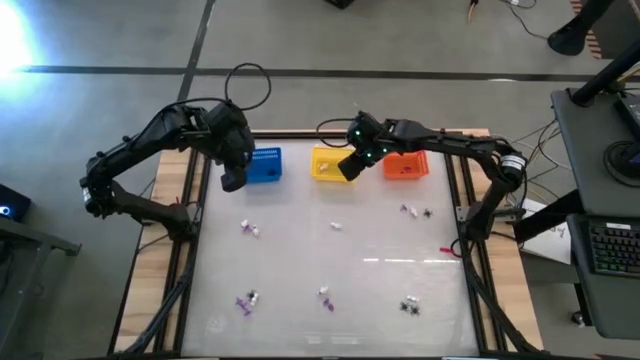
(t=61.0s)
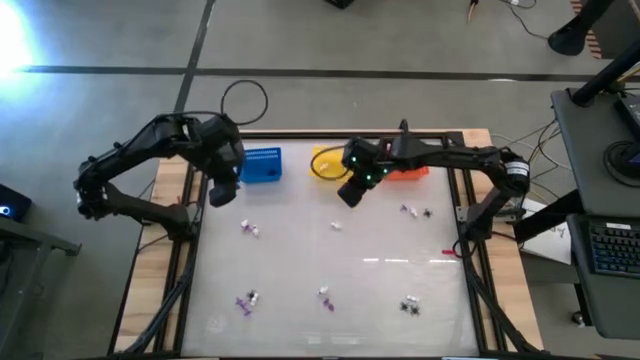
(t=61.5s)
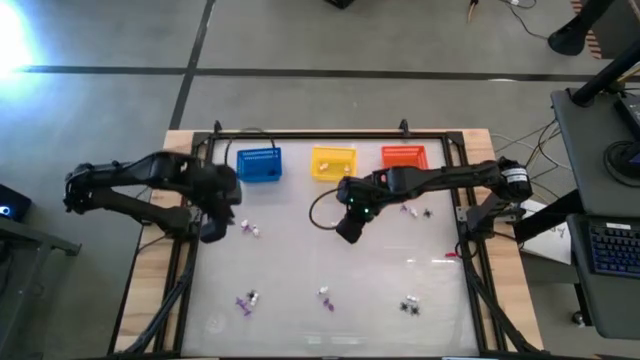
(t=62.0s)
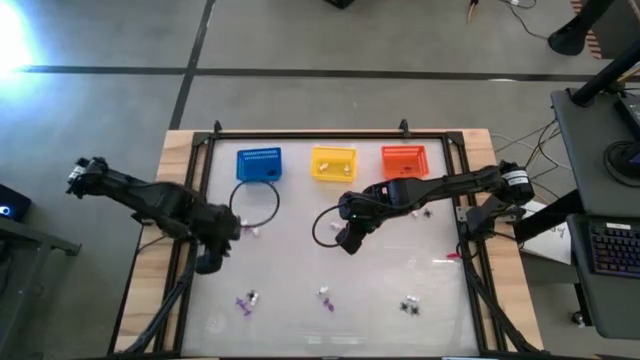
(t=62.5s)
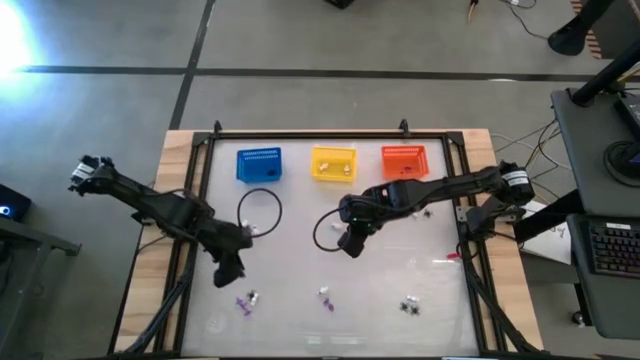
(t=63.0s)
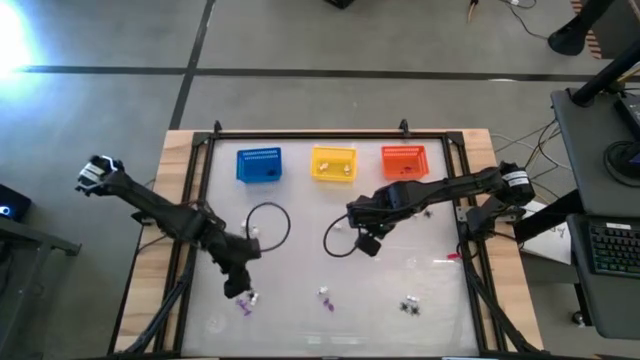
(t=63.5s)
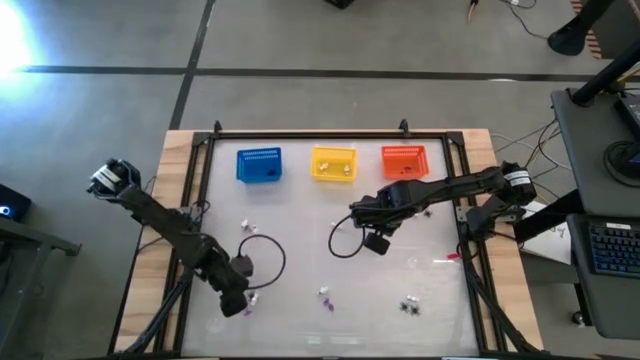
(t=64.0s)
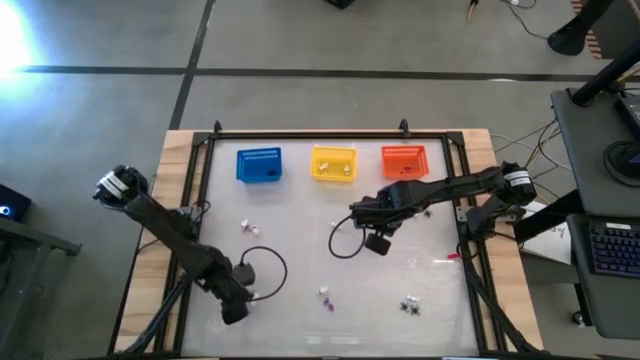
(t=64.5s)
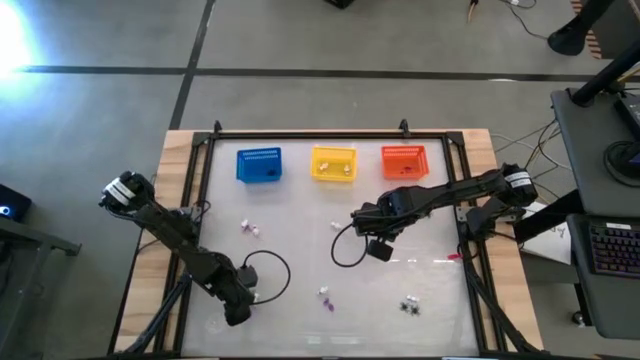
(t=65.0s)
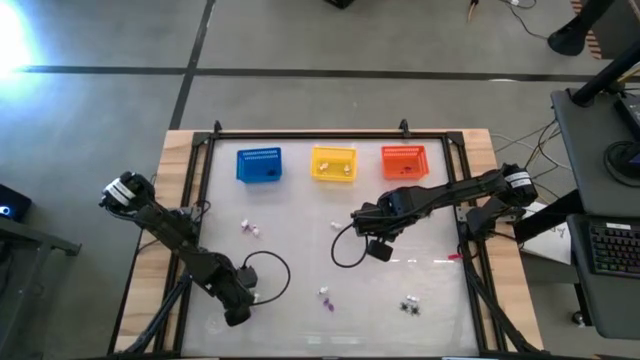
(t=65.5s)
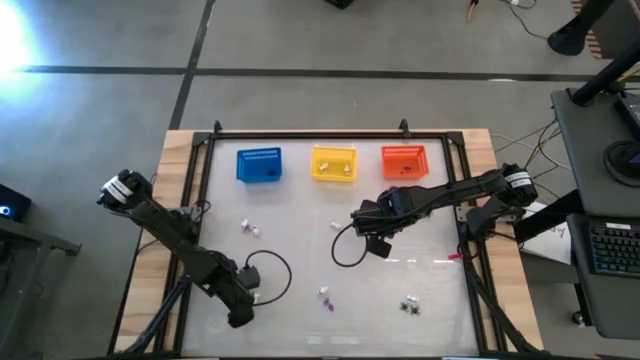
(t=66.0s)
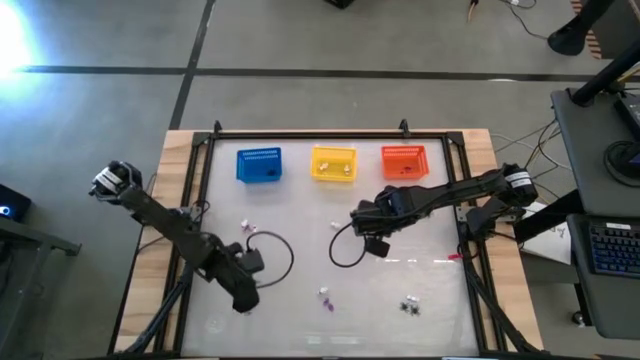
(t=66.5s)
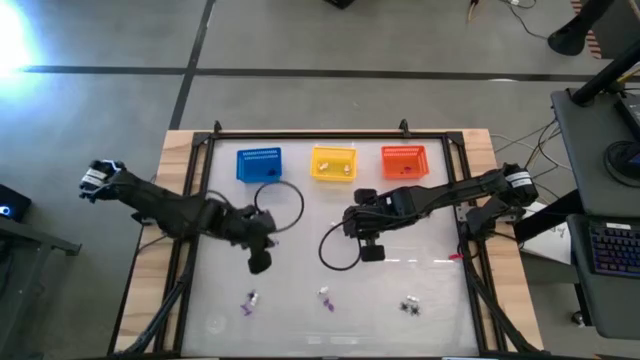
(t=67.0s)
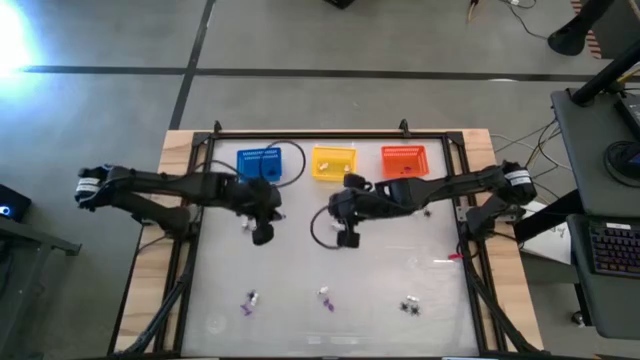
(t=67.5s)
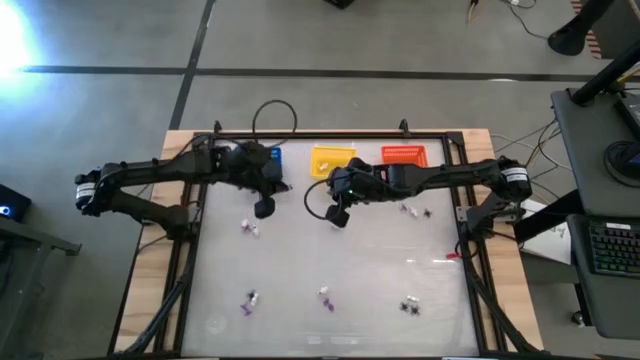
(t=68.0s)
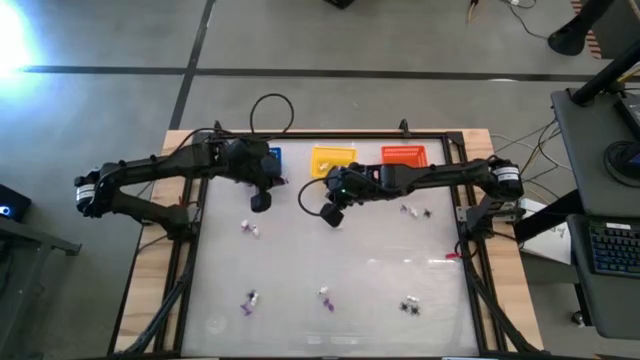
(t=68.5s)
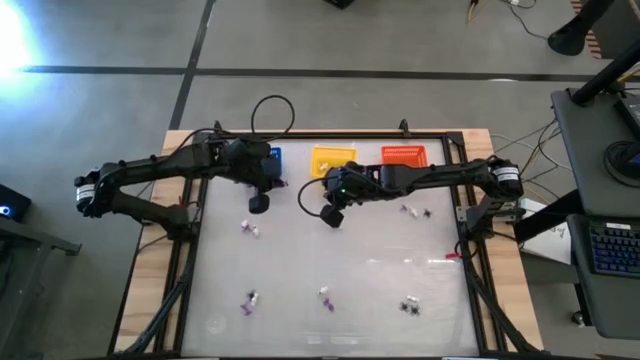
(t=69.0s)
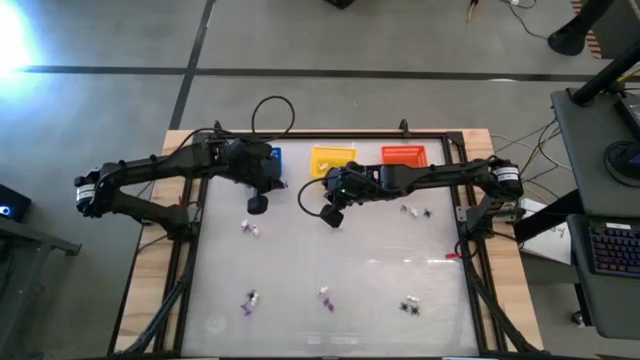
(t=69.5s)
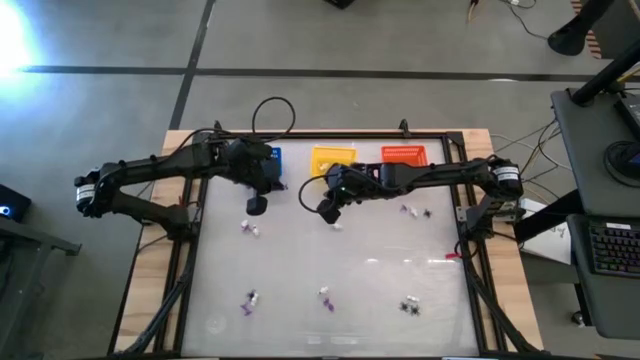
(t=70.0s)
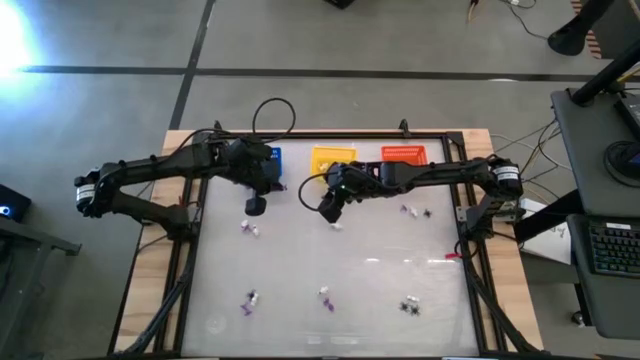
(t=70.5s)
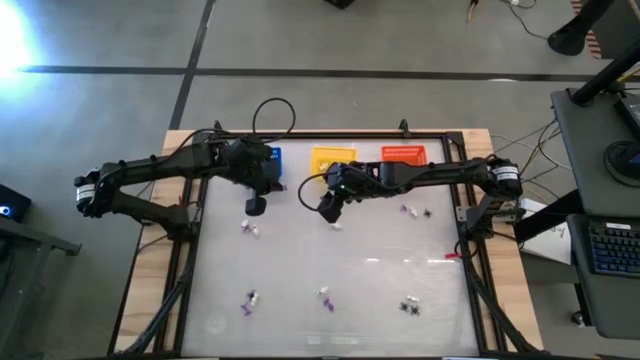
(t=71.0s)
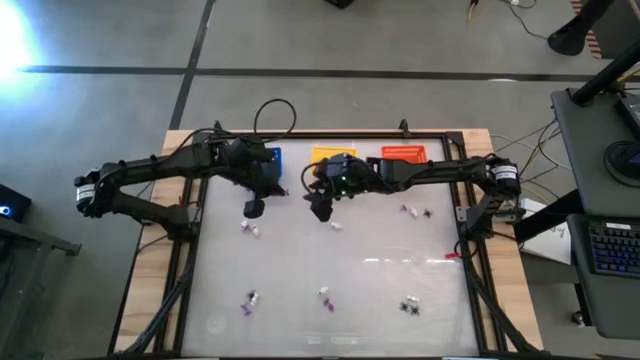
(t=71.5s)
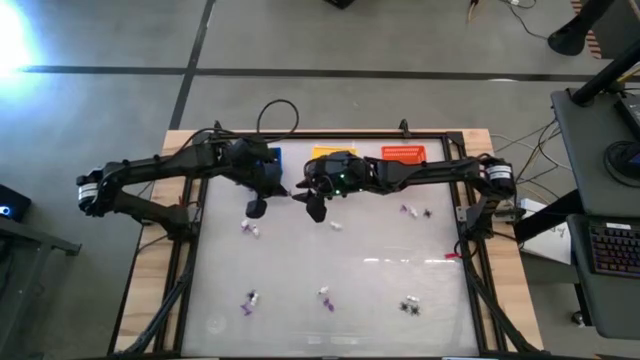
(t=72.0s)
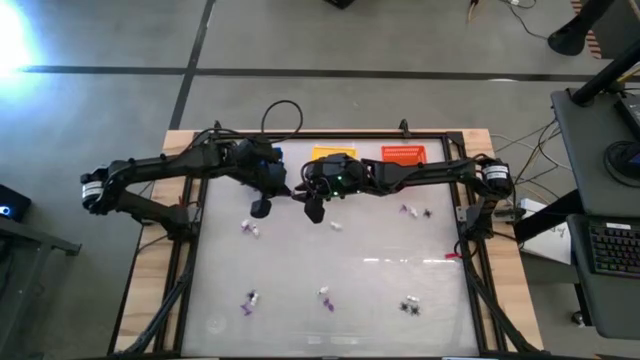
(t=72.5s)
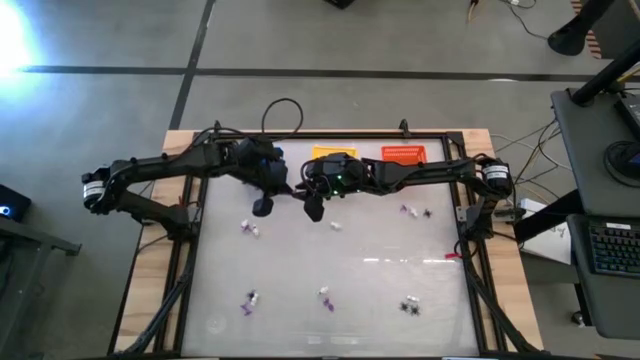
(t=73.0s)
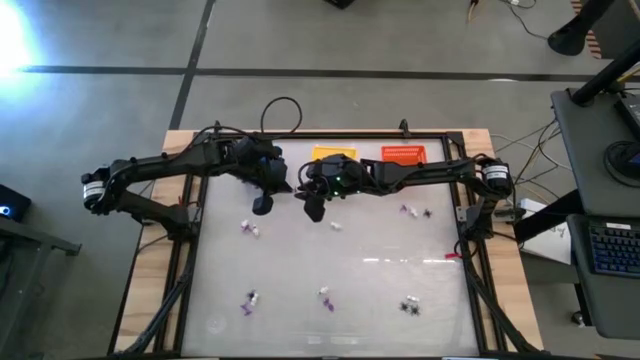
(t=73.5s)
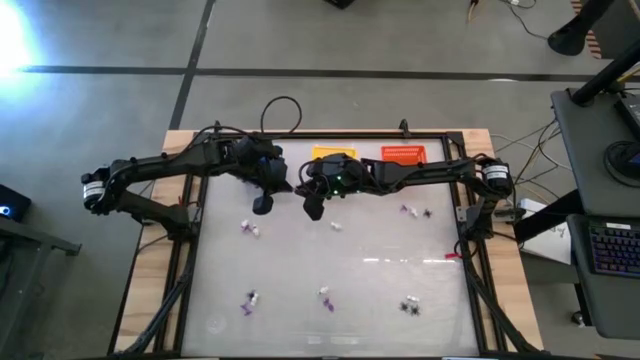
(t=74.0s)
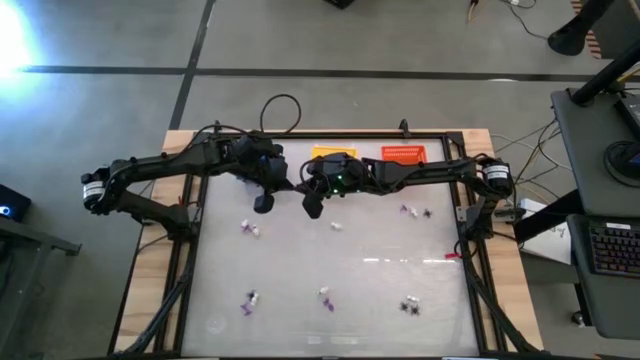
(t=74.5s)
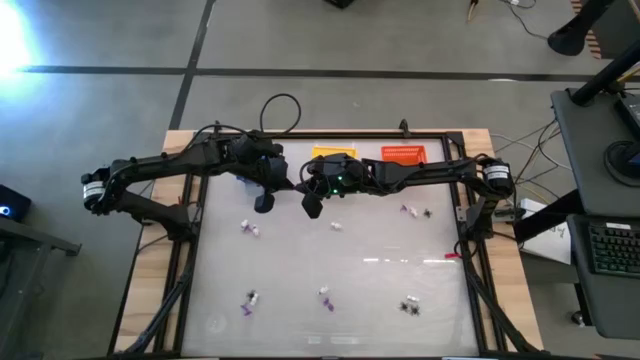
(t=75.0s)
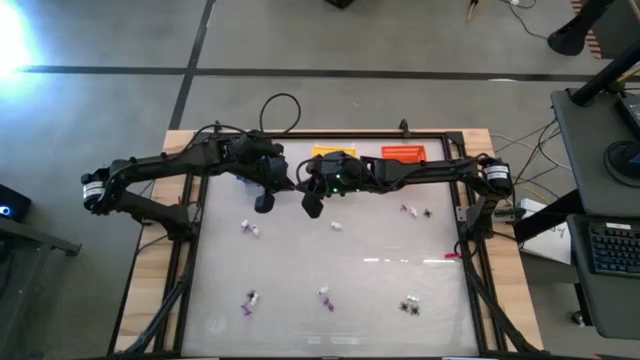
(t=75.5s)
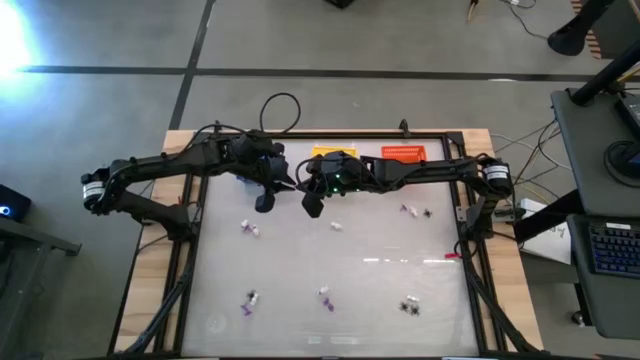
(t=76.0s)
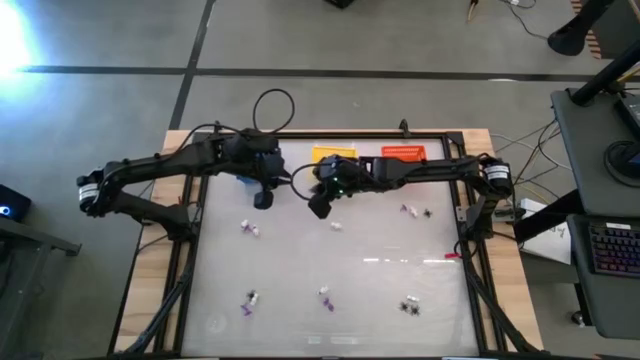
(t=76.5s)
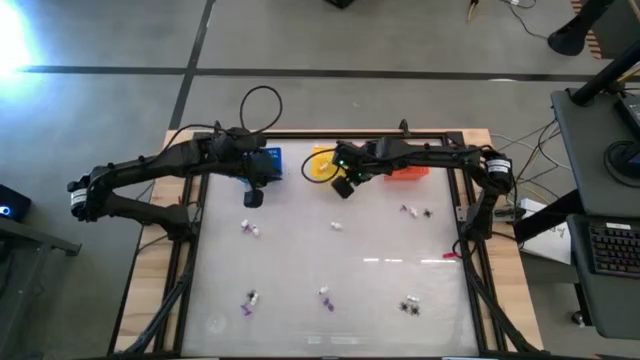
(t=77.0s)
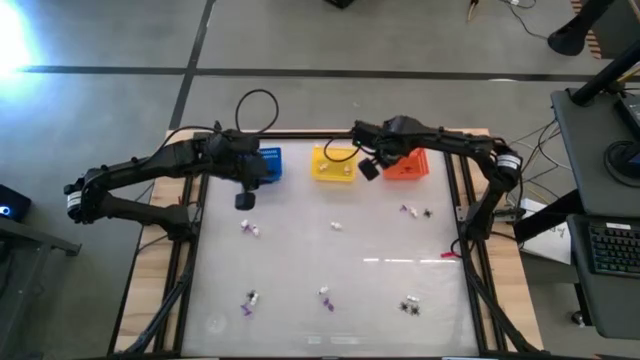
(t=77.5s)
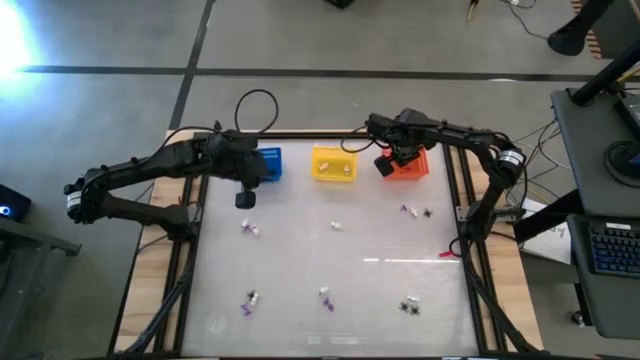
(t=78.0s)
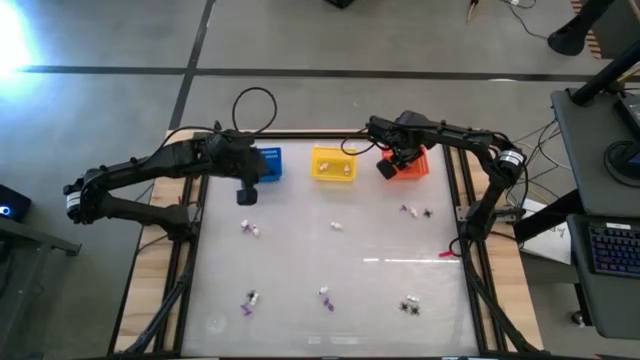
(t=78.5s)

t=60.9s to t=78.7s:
Task: Sort Halloween decoration
Put the purple hat toy into the orange bin

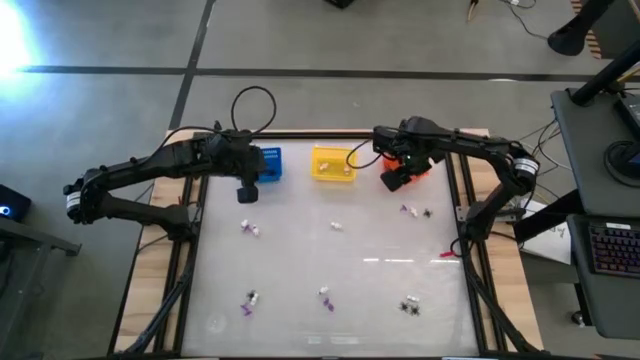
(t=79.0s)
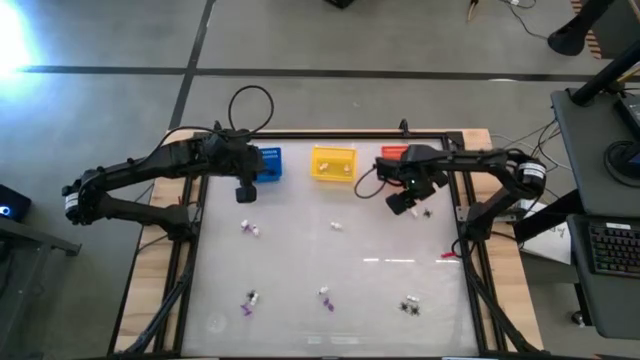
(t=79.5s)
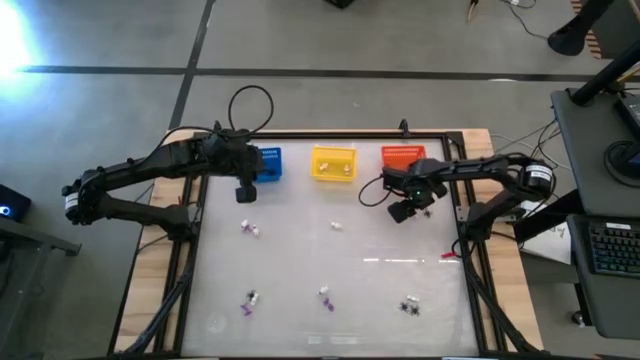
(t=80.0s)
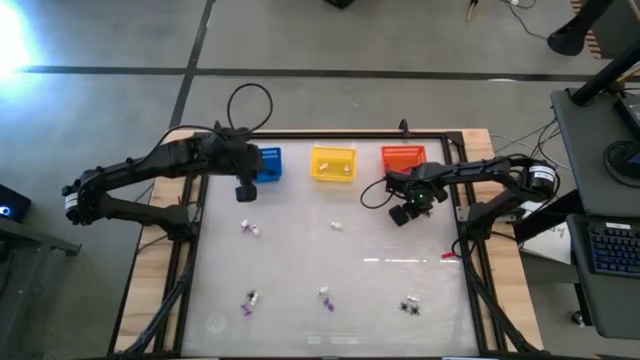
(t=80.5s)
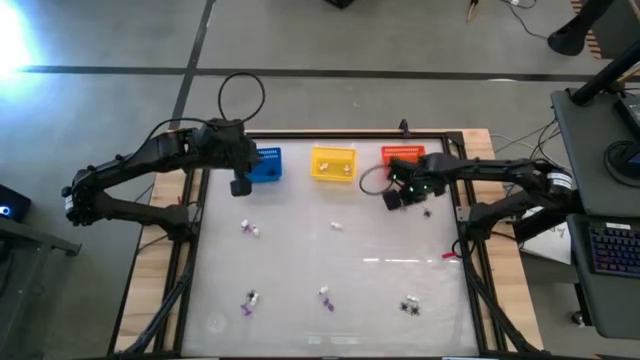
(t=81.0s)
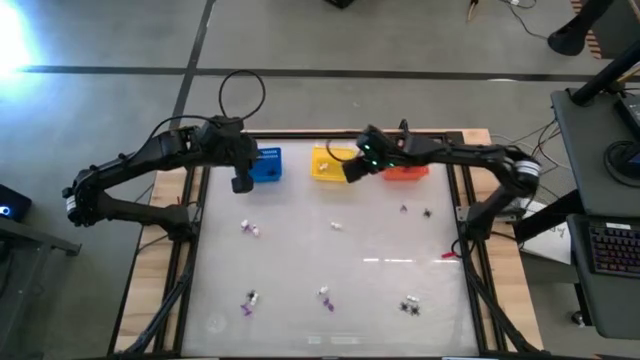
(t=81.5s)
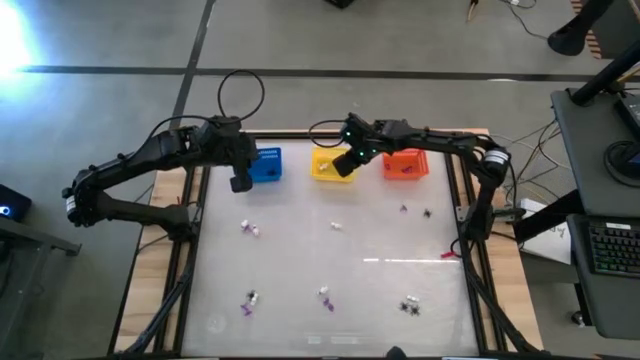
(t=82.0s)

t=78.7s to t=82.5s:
Put the white skeleton toy into the yellow bin
